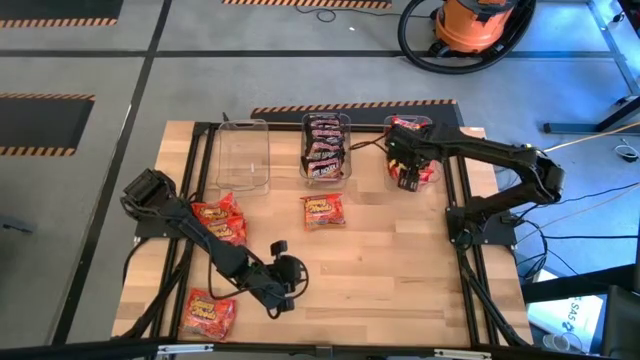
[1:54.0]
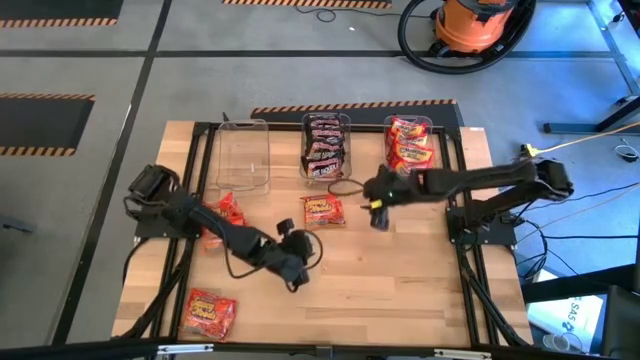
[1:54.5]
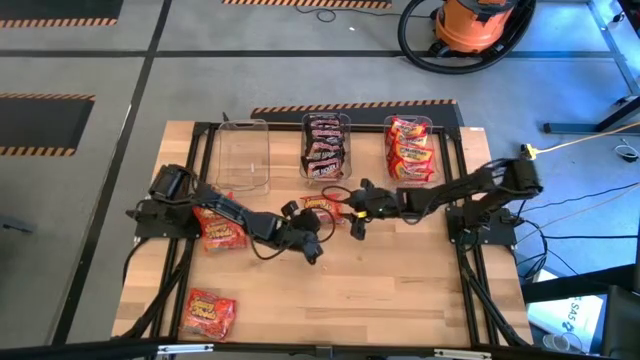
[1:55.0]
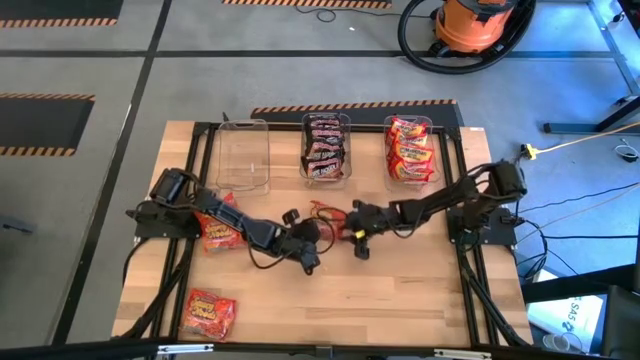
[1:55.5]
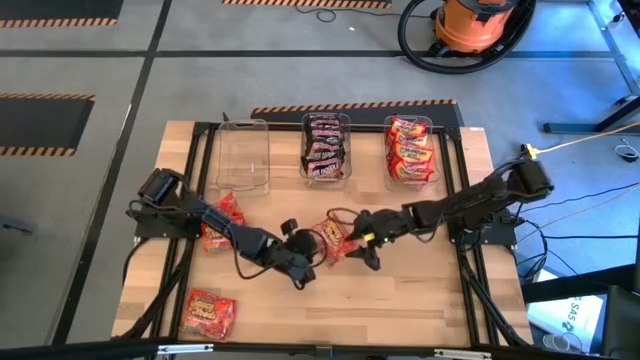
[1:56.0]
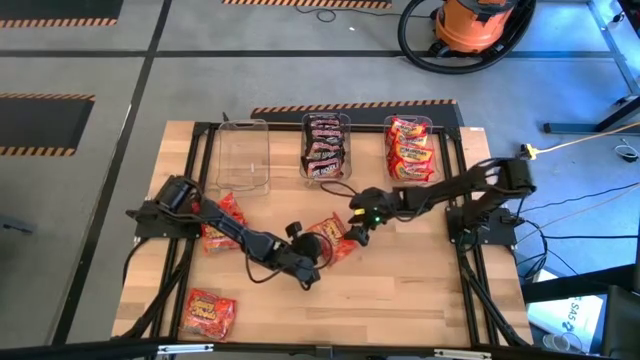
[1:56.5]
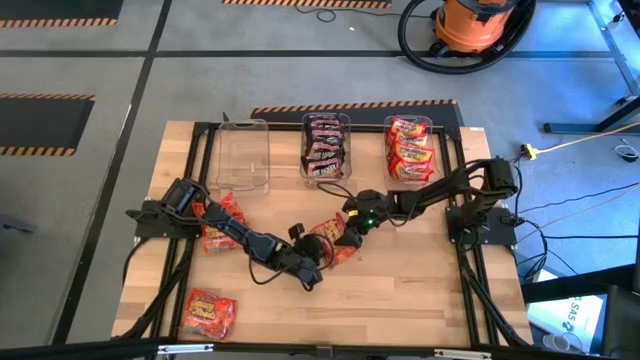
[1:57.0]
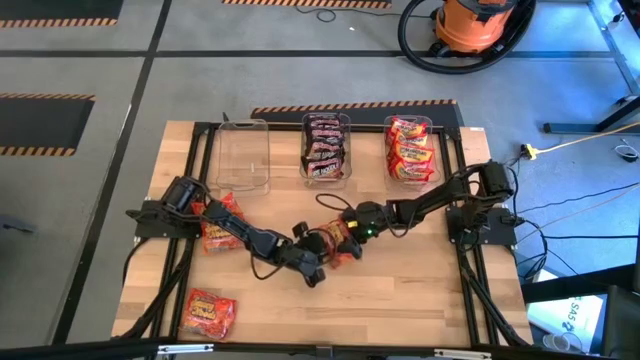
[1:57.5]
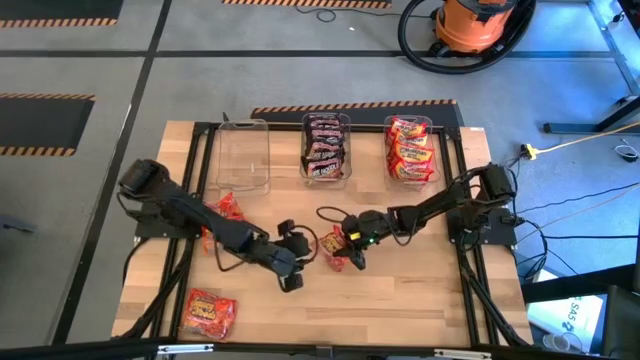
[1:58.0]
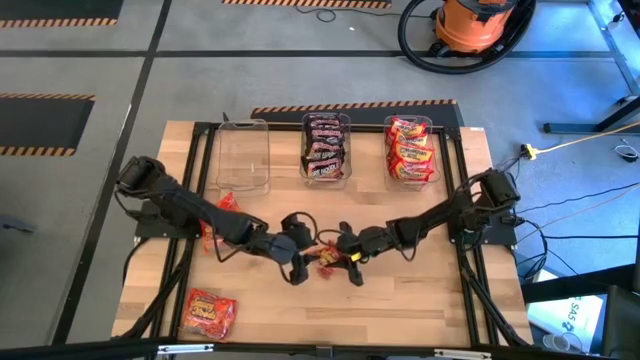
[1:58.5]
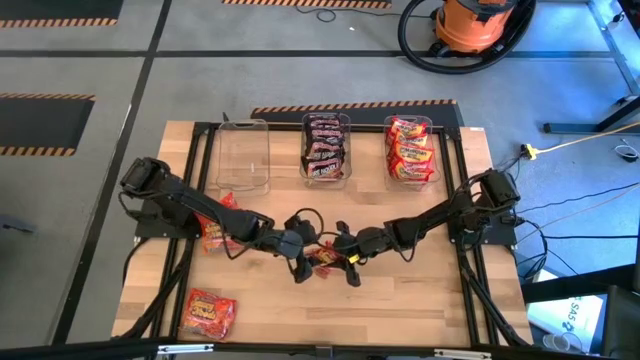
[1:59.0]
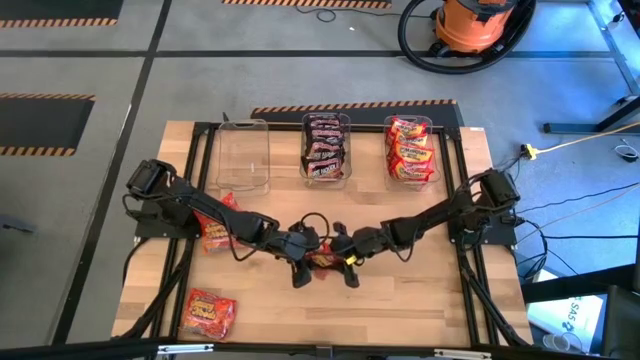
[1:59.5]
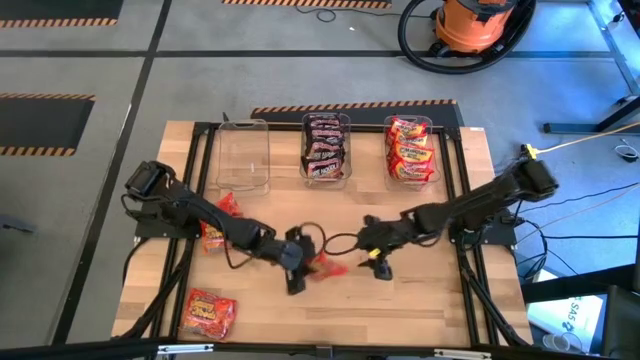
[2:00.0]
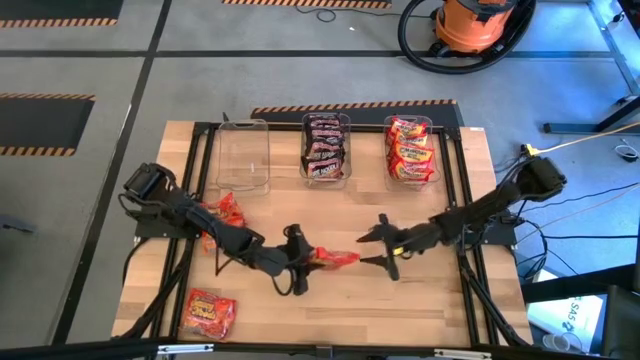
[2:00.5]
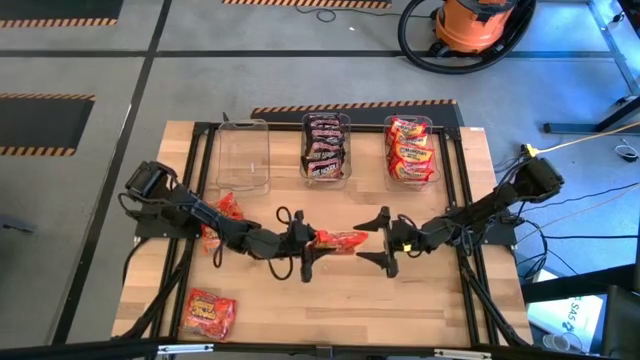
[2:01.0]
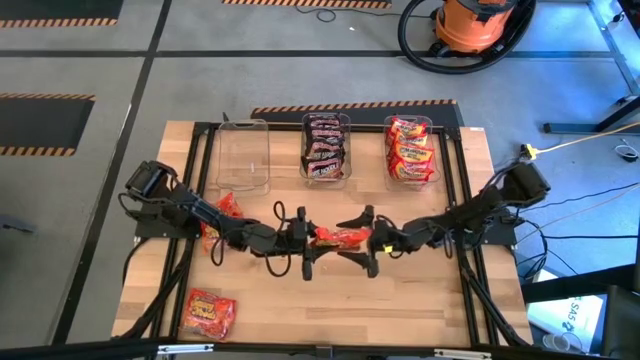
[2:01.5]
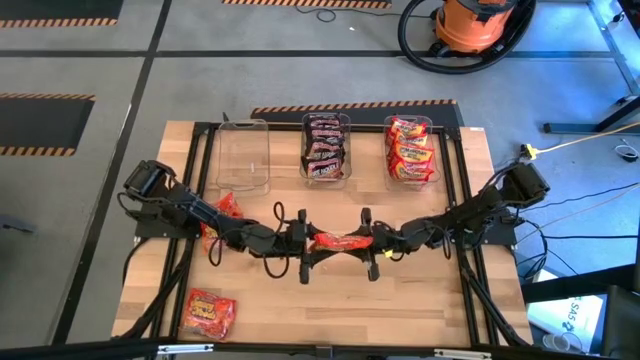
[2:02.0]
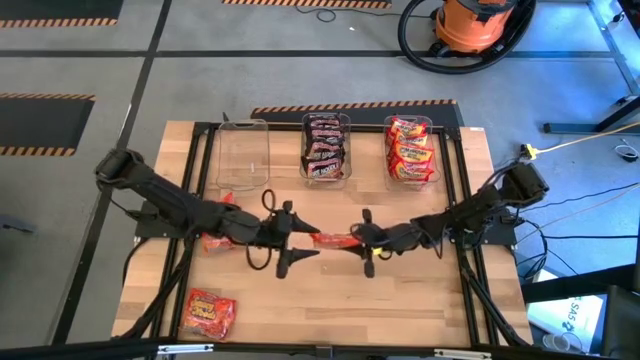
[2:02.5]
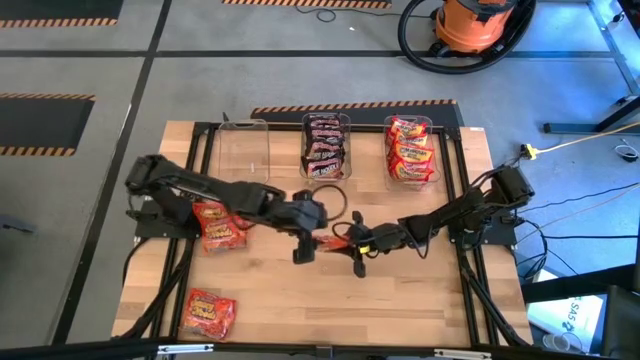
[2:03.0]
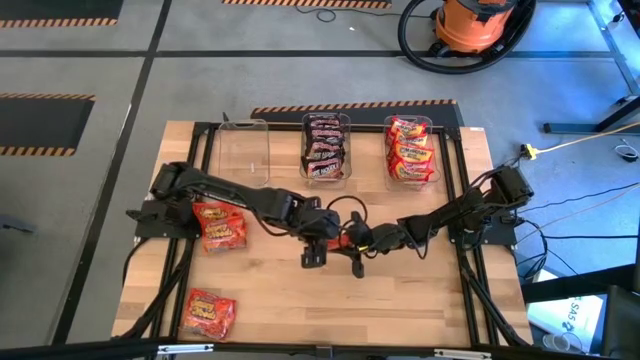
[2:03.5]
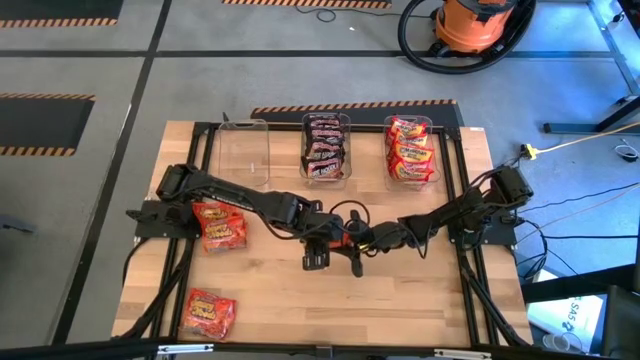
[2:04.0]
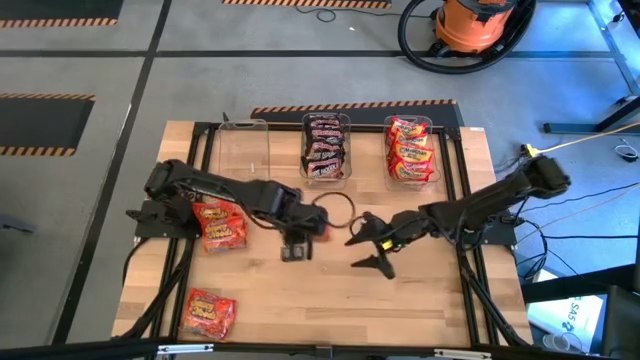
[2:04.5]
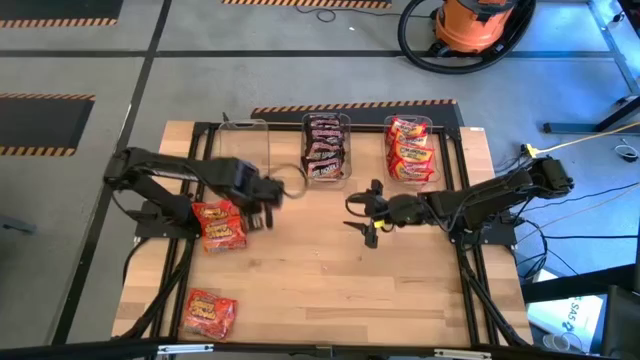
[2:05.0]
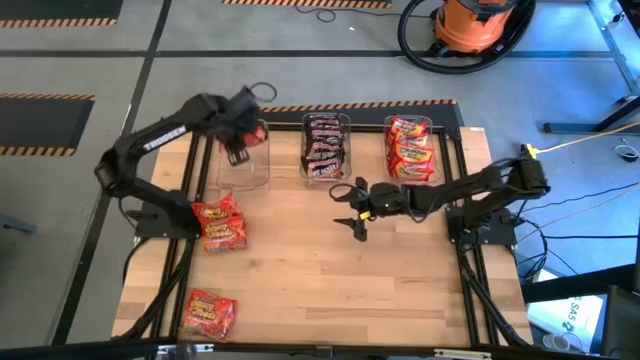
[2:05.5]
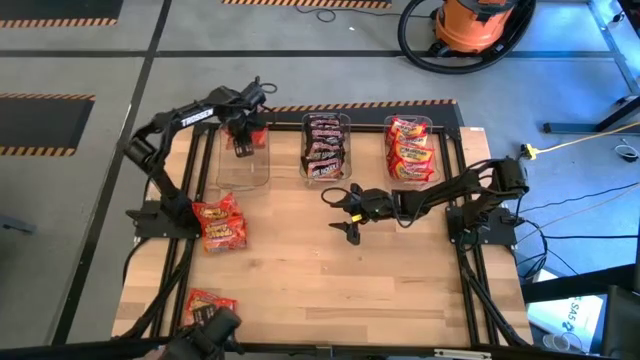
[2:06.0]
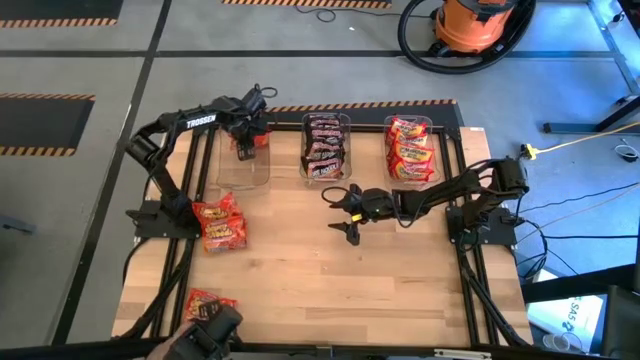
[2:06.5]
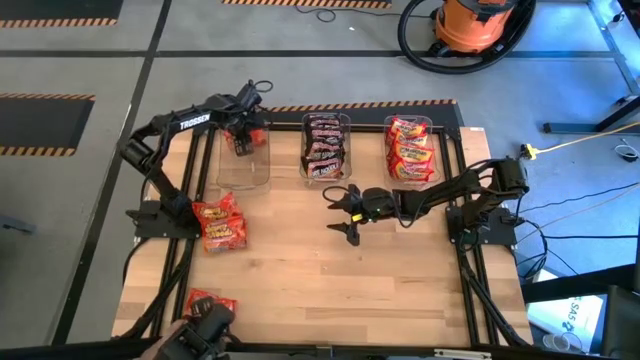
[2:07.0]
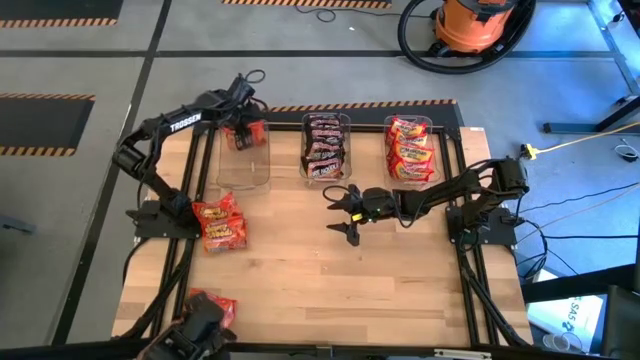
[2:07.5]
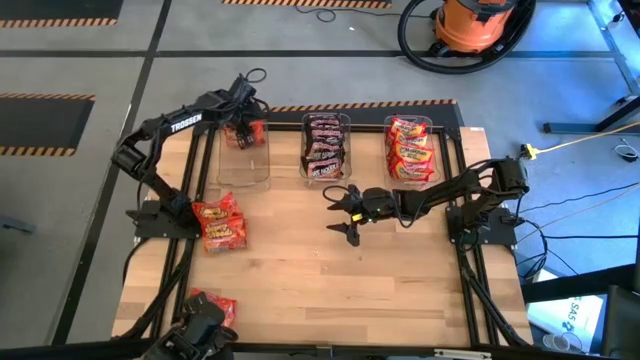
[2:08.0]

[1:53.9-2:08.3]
Task: Sort Maruchan noodles
Put the orange noodle pack into the left transparent bin

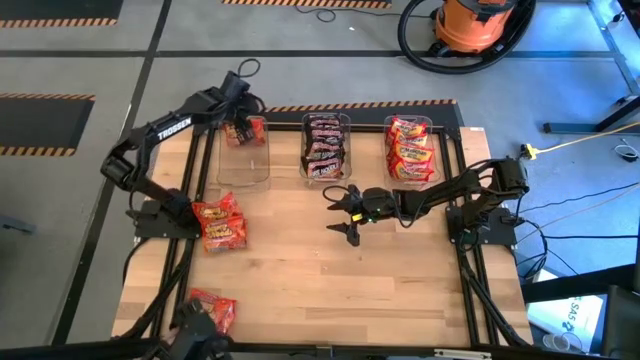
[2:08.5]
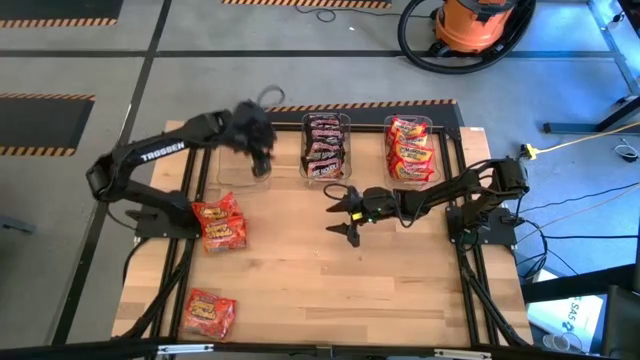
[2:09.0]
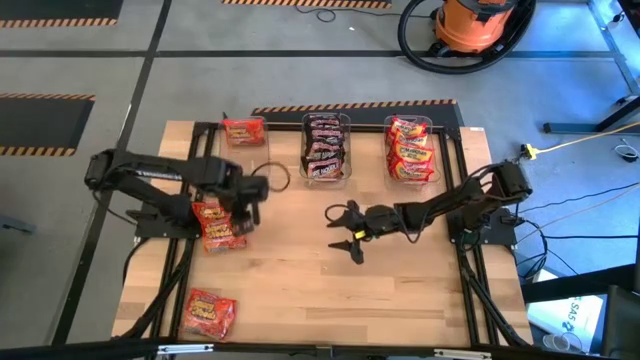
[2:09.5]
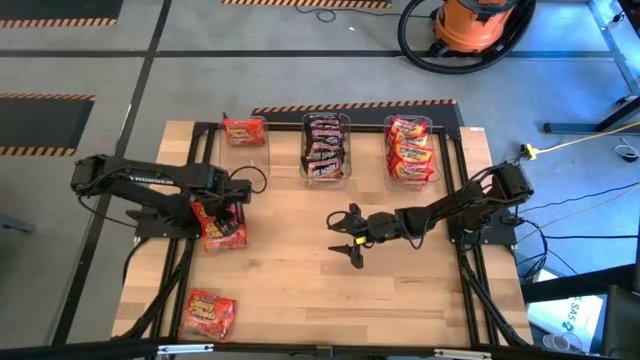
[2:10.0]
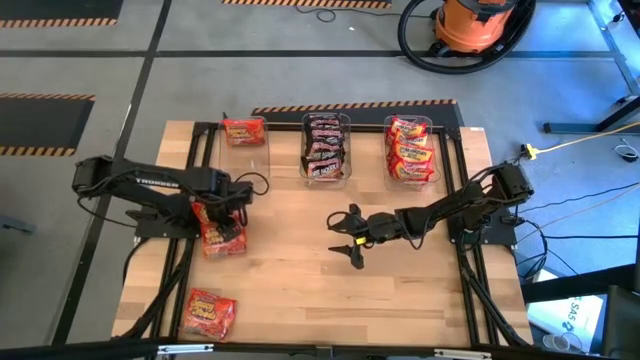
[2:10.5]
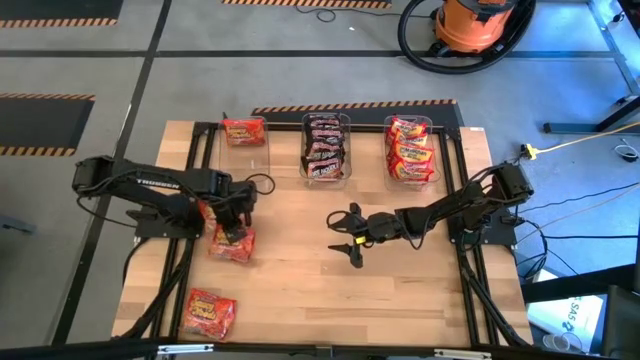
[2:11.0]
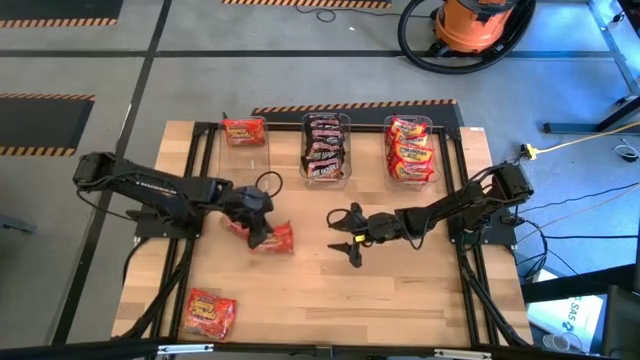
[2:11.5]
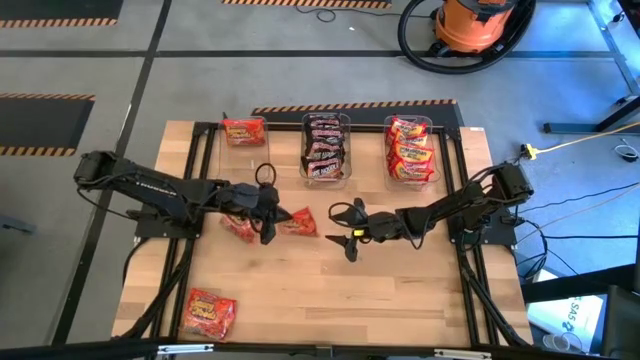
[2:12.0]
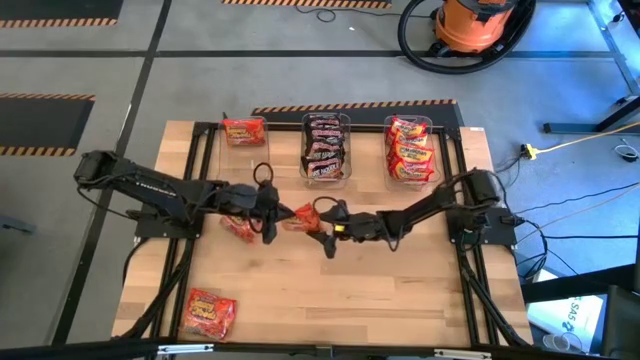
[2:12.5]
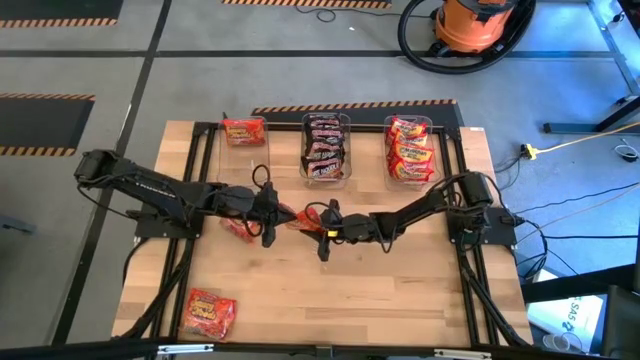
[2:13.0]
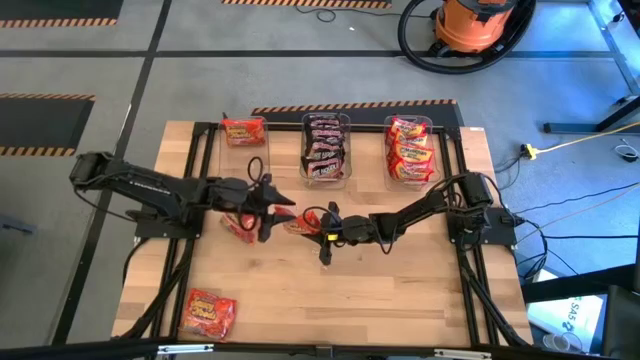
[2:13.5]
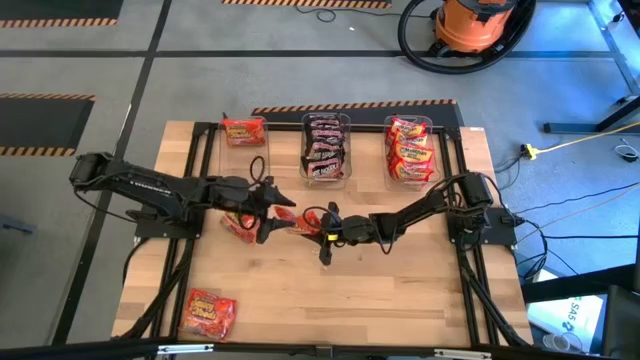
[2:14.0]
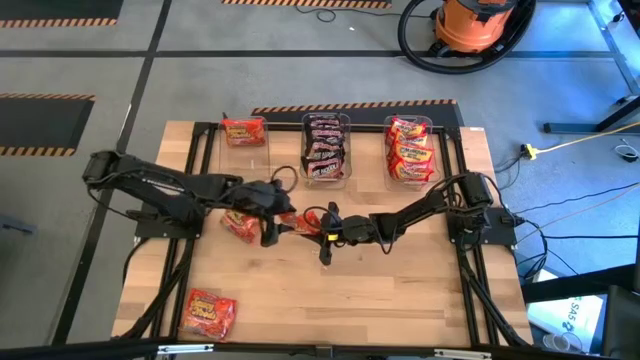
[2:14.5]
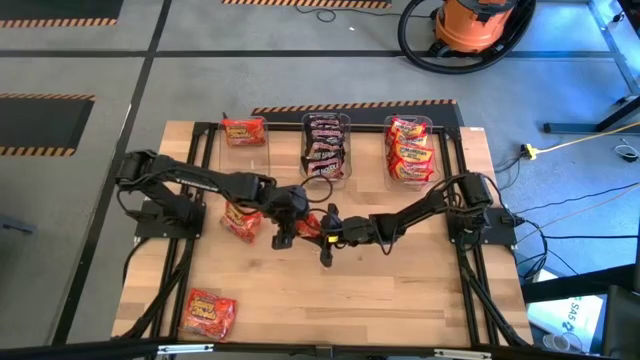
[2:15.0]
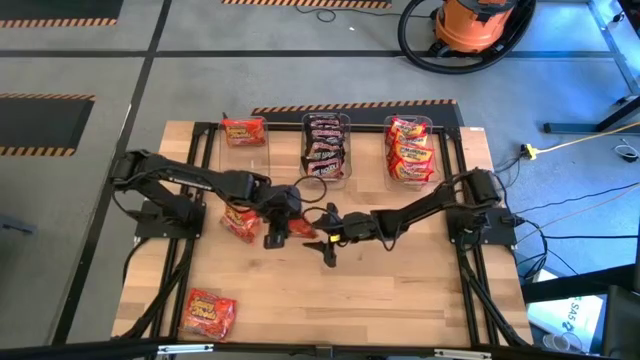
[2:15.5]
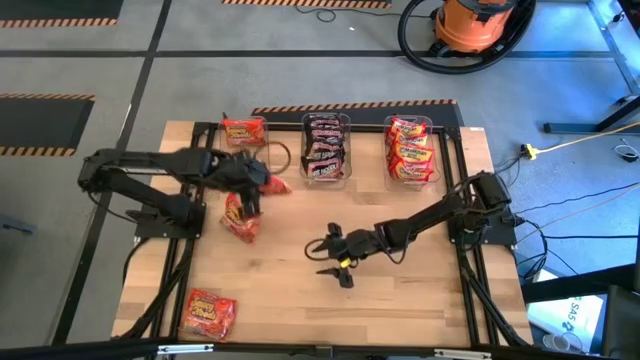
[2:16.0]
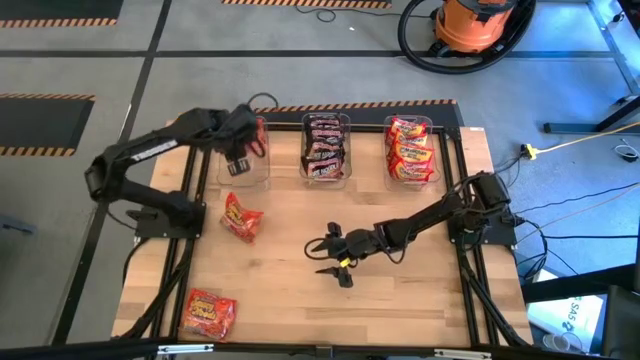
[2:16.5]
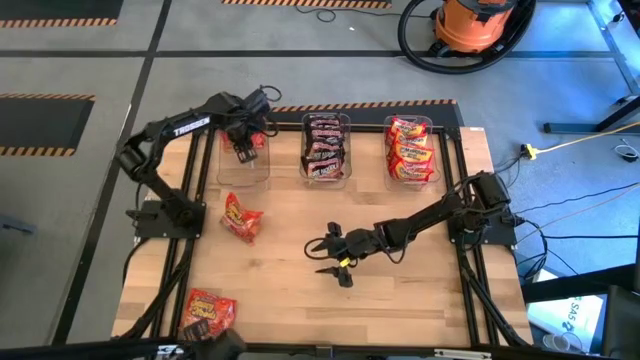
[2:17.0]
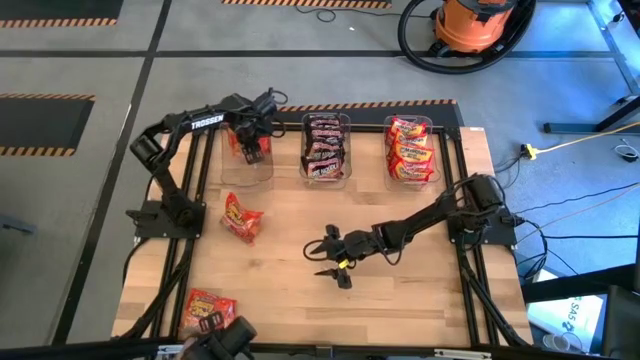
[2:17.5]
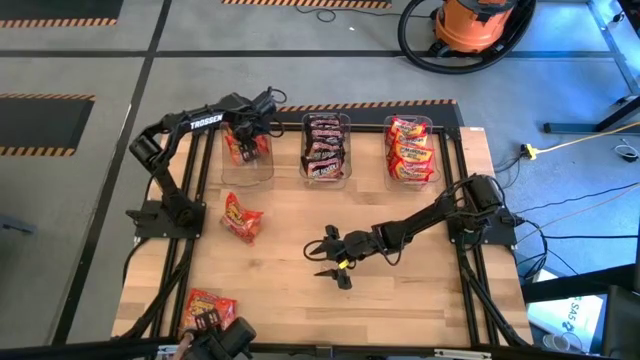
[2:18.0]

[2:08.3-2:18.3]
Put the middle orange noodle pack into the left transparent bin
